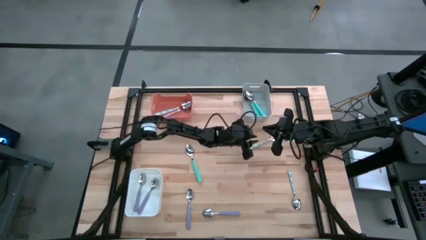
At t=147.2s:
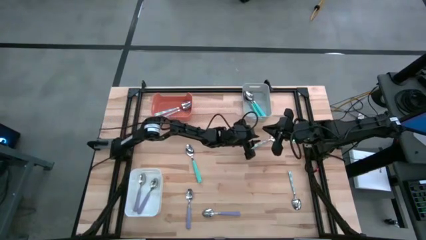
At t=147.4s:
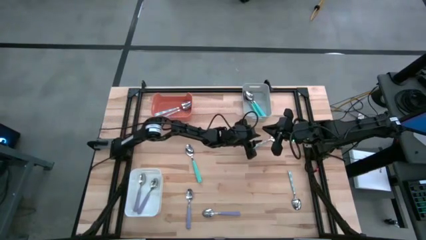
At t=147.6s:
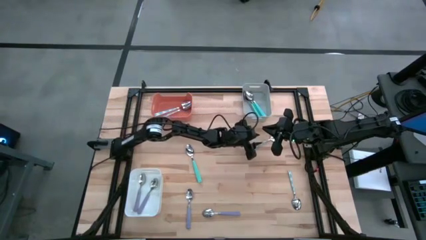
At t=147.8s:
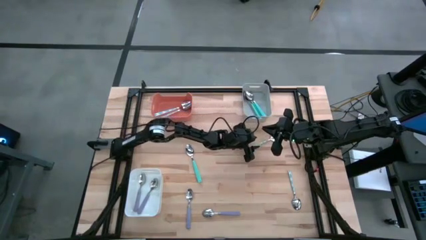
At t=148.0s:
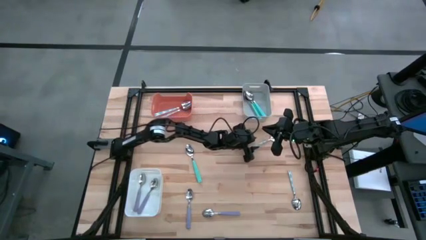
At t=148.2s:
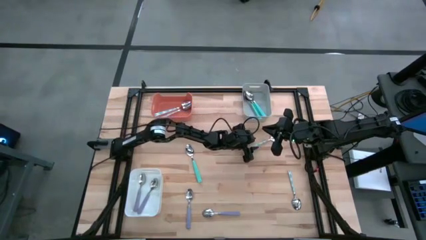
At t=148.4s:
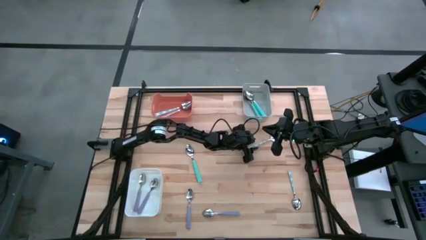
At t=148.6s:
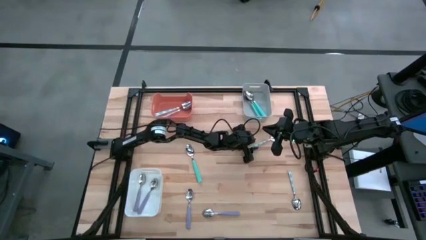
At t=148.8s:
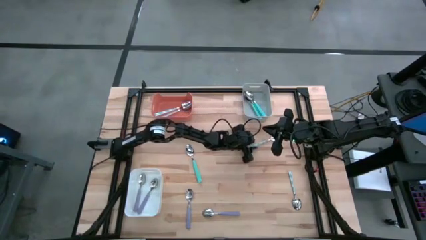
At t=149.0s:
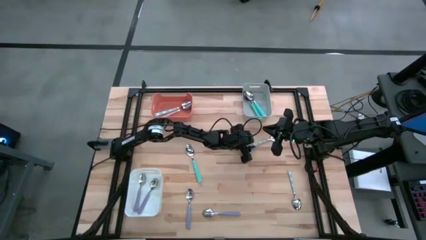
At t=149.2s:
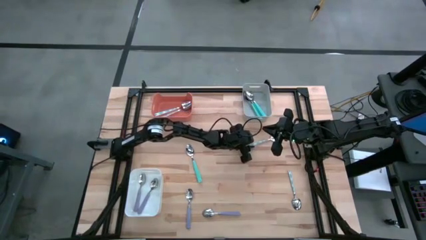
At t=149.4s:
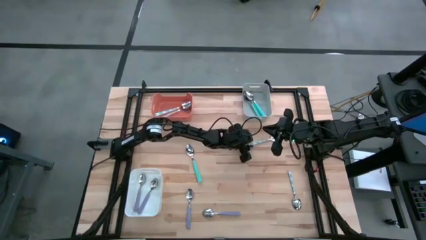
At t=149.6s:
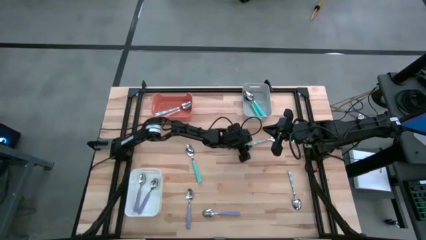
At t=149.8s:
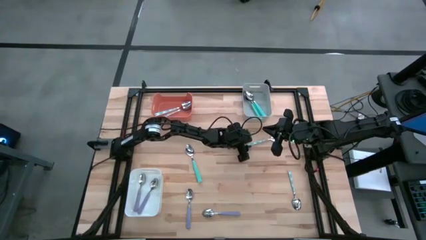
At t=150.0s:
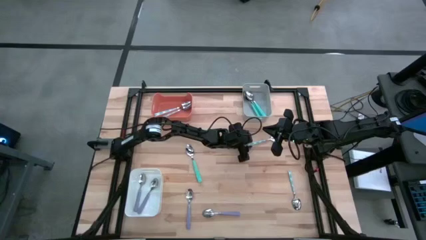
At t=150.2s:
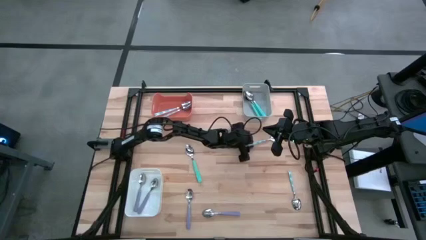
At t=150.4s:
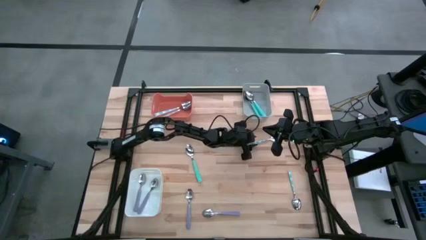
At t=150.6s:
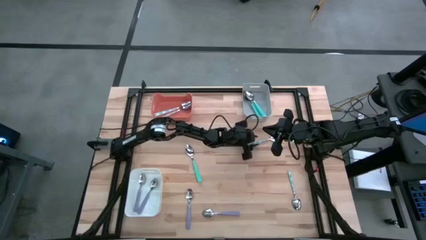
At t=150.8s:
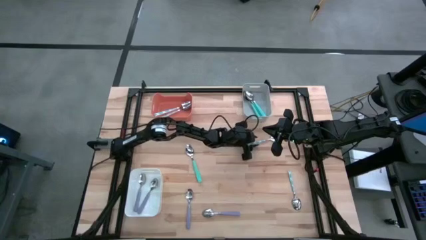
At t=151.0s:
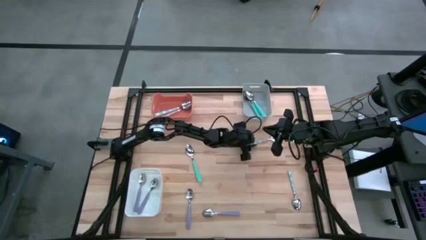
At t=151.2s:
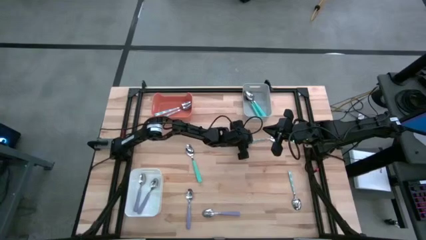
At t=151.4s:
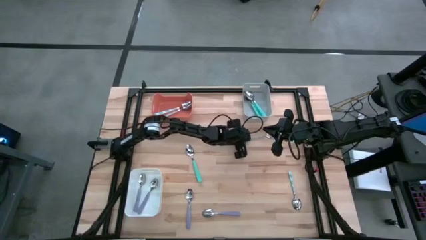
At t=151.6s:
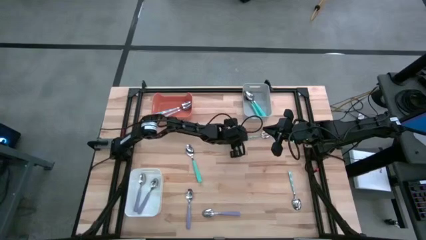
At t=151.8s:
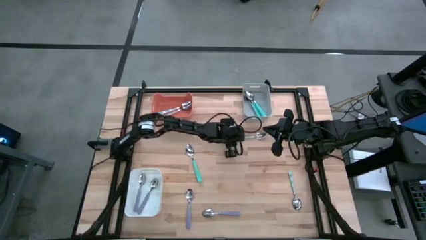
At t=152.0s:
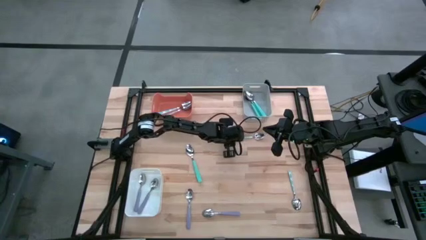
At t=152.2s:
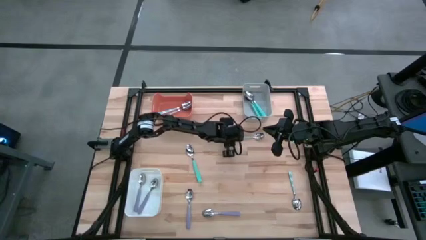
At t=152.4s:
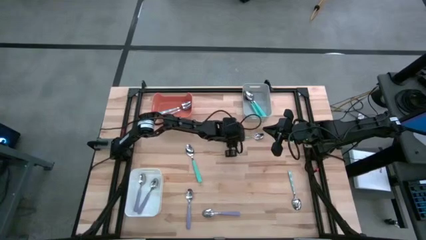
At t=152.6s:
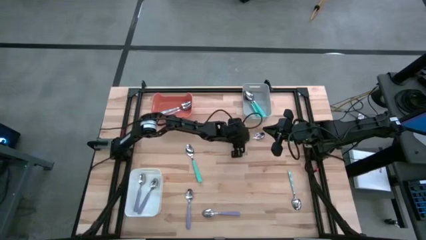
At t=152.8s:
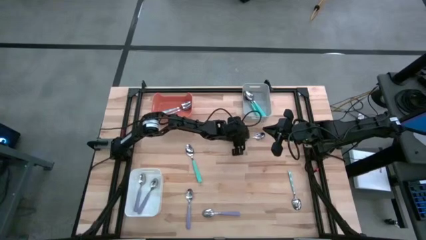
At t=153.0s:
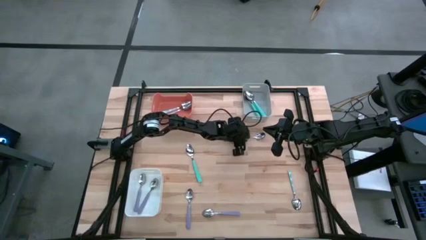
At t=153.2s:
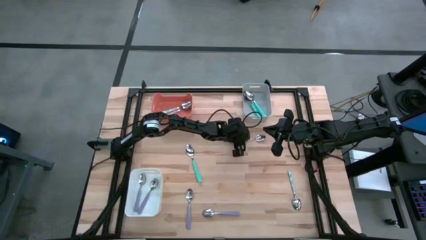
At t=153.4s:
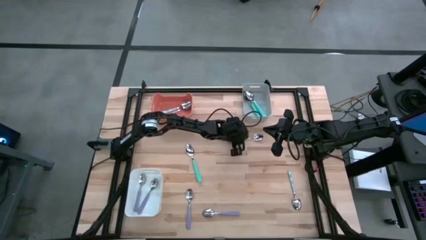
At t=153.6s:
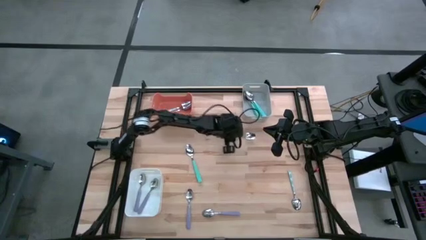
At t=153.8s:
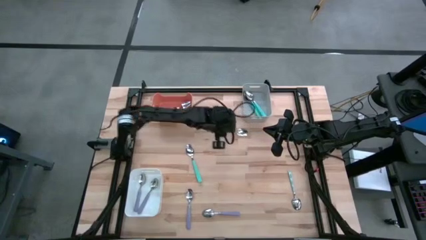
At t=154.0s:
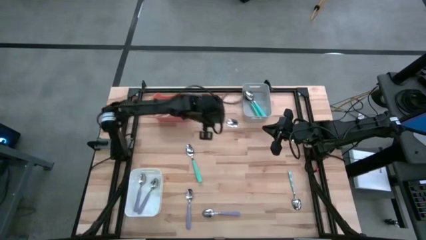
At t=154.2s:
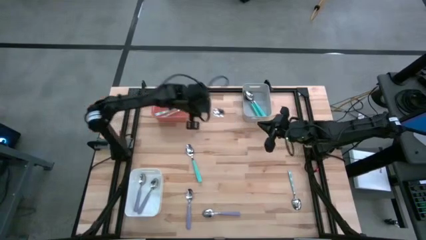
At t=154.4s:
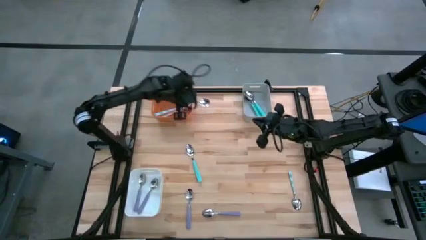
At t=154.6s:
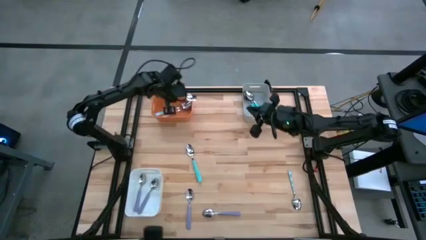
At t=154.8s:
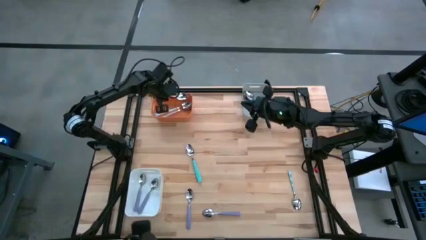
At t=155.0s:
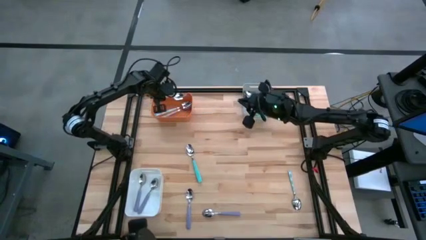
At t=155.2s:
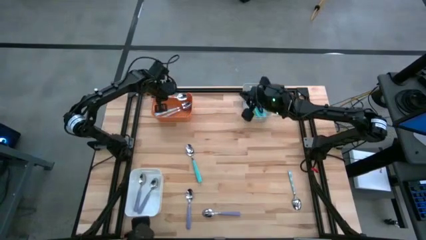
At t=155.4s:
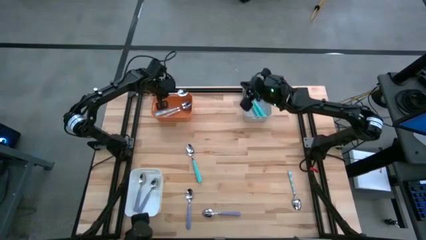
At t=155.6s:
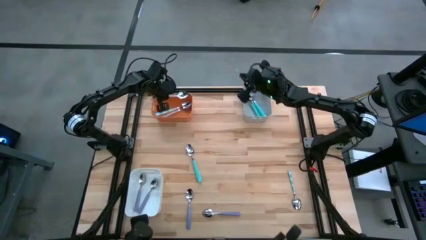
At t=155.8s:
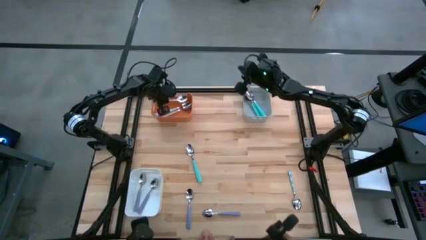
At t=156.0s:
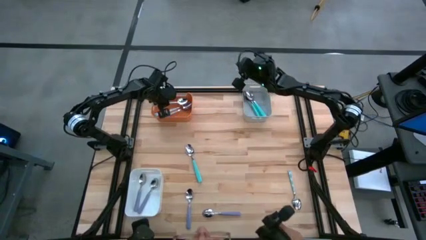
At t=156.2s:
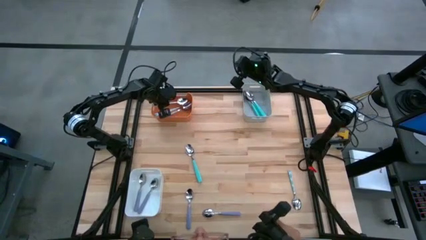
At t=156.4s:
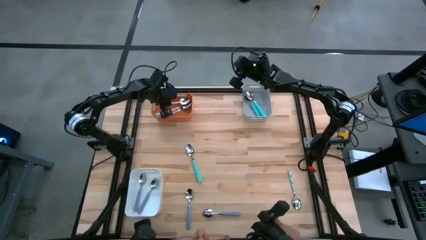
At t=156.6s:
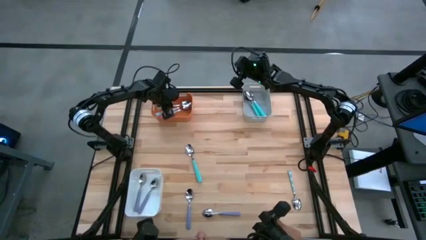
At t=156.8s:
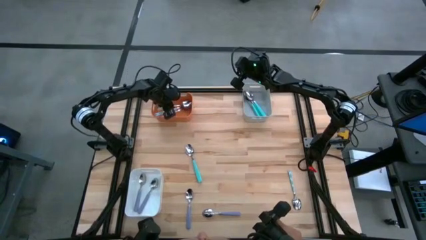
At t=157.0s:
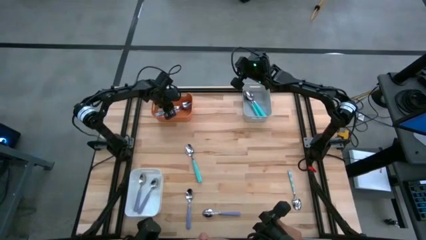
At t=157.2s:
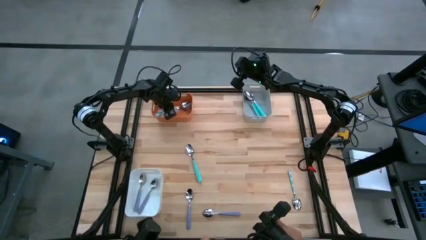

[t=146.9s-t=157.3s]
Task: Sort silverware by color (type)
Put the top blue patterned spoon into the orange bin

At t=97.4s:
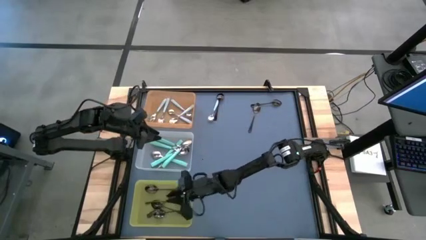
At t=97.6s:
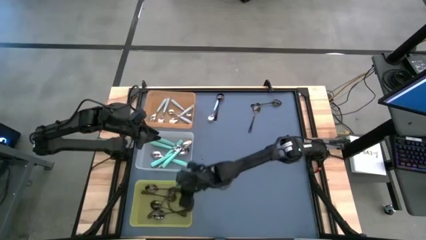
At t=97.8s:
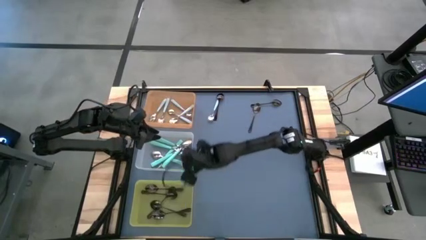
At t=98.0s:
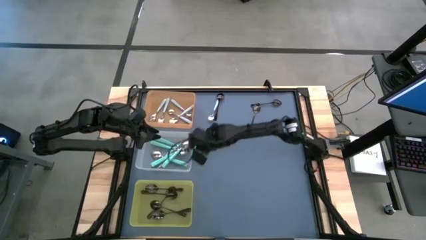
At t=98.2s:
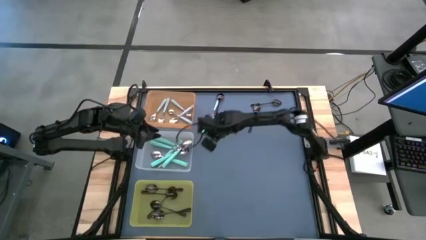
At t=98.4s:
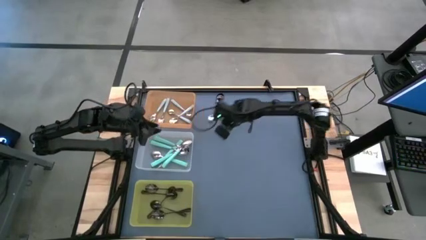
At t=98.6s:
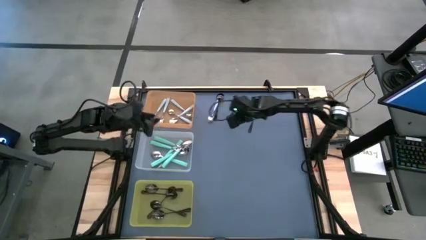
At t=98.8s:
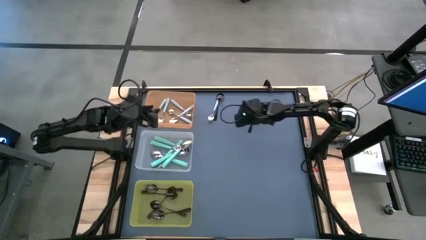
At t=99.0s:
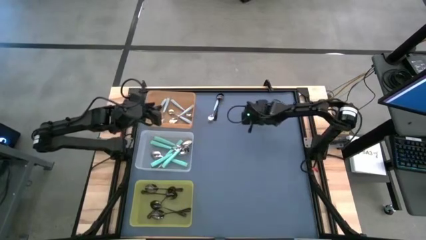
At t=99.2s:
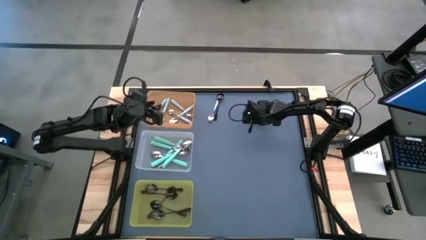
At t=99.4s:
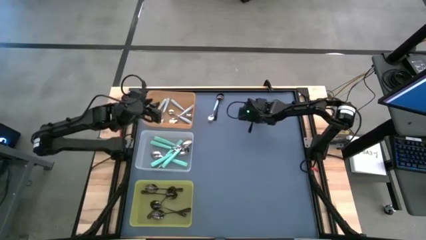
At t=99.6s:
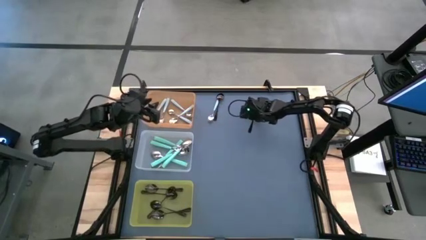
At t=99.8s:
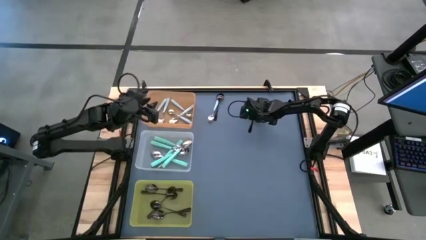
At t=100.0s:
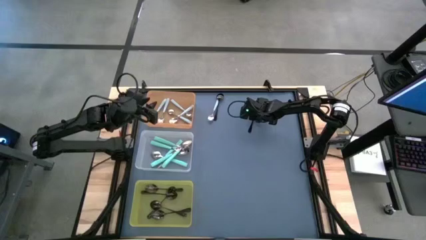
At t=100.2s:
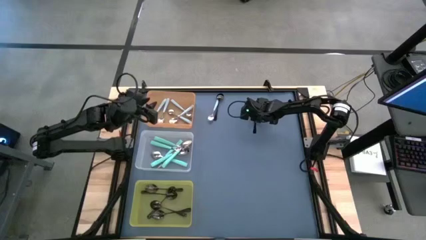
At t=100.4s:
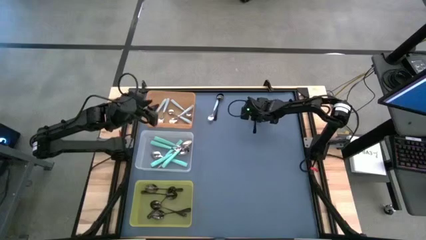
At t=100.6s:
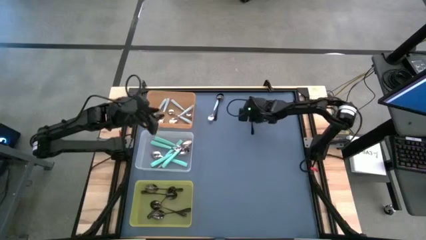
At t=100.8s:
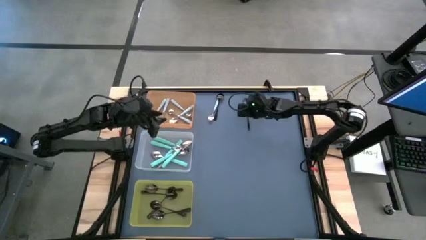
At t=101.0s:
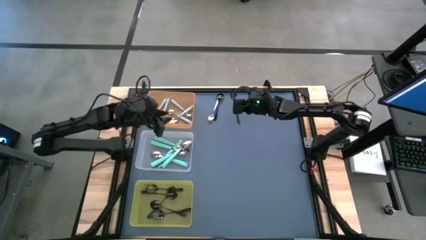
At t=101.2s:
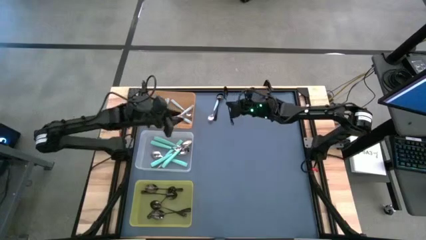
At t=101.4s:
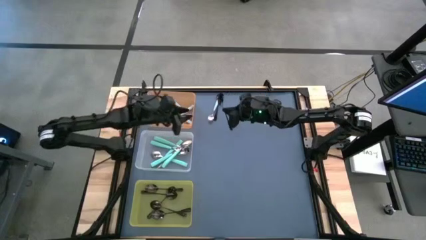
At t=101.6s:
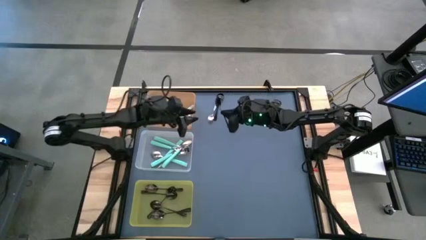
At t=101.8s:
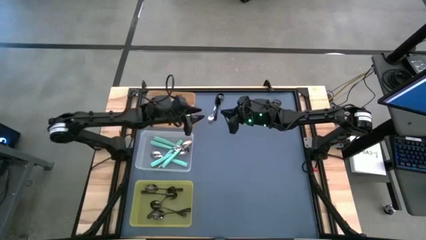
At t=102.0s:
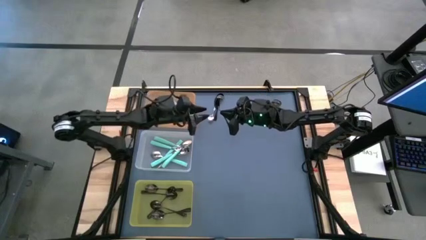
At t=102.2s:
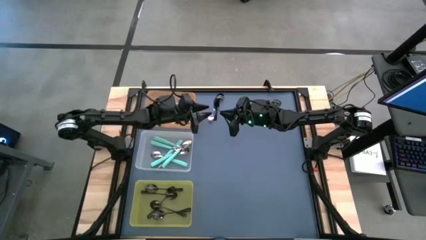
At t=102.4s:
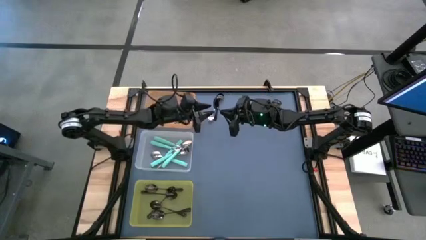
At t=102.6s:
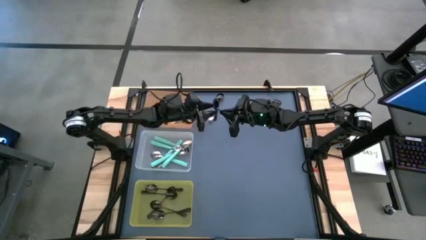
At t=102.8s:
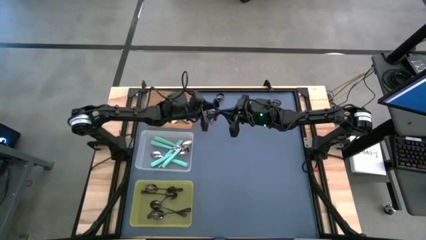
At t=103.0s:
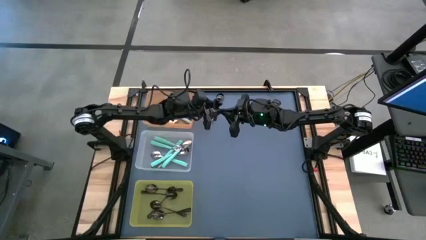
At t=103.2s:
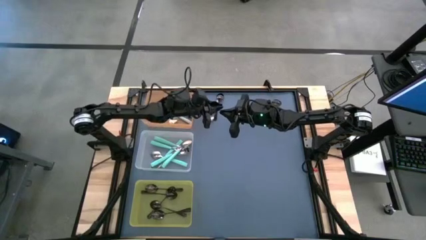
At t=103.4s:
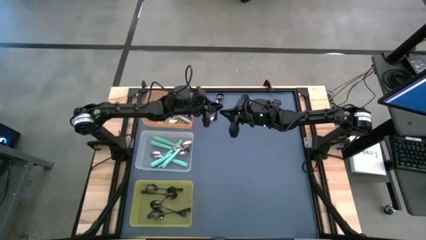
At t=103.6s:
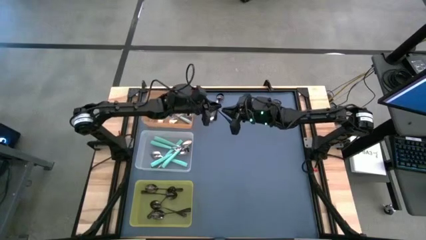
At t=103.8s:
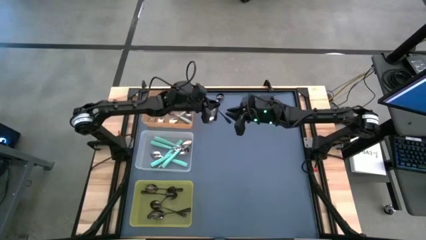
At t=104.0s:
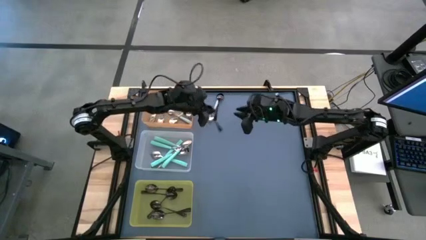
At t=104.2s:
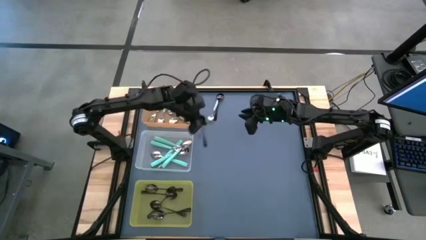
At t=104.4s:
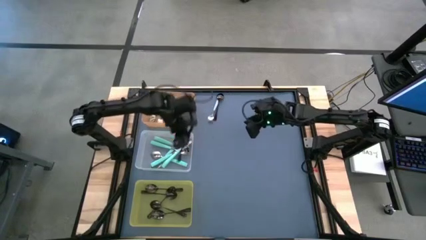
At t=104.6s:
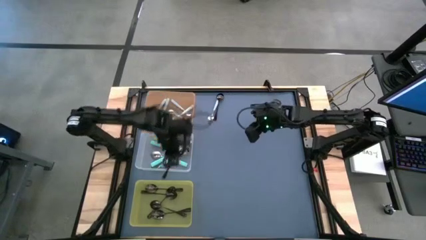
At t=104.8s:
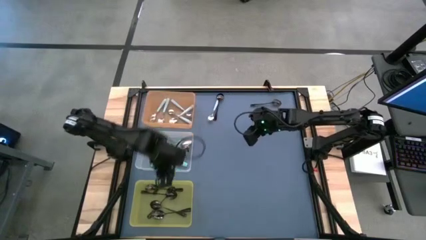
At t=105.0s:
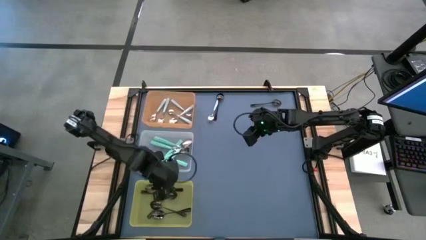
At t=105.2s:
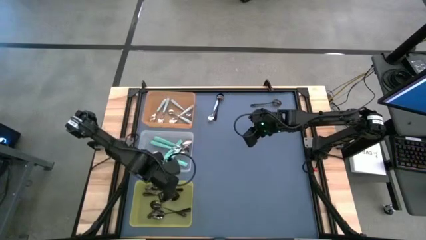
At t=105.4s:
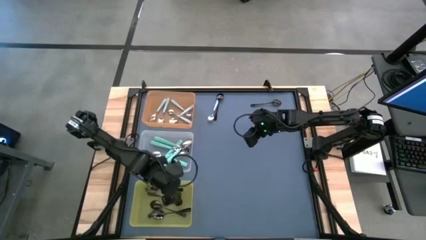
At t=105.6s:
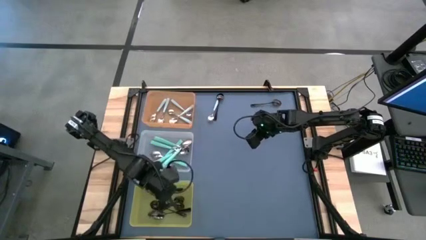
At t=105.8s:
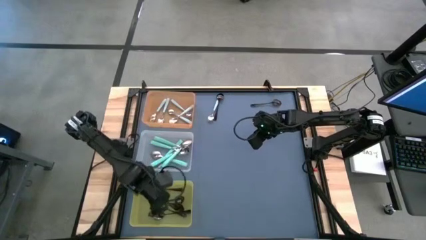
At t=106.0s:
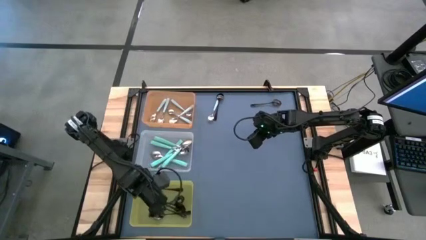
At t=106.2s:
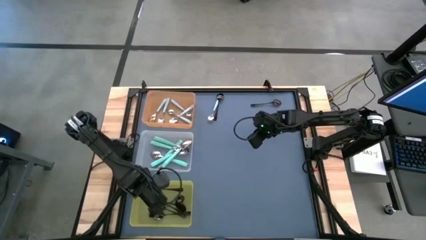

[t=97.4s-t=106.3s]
Task: Sort silverware by color (type)
Put the black spoon into the yellow bin
